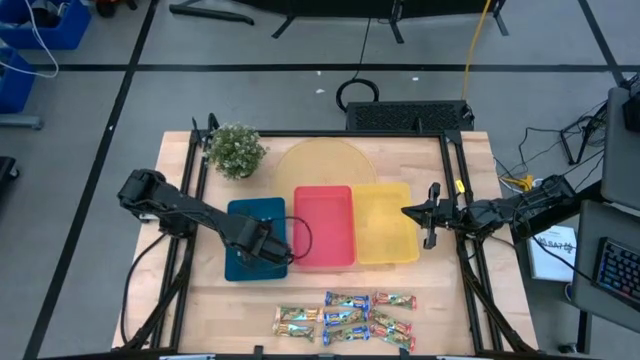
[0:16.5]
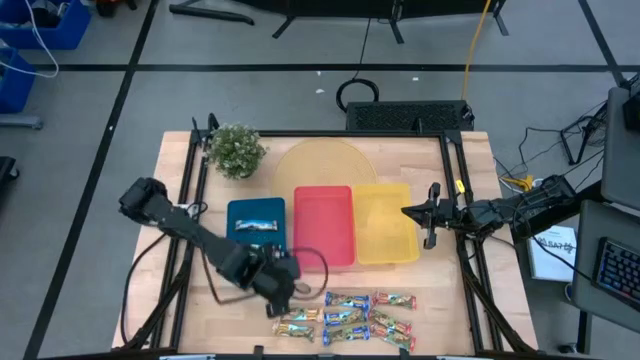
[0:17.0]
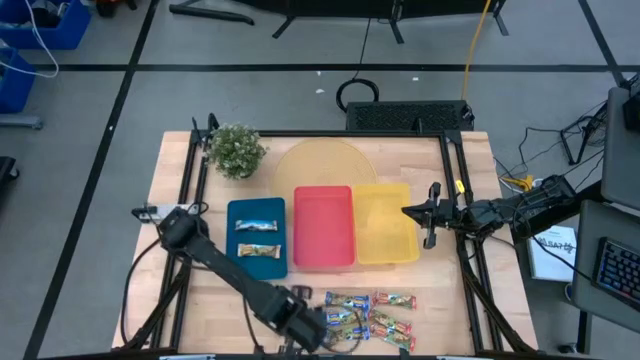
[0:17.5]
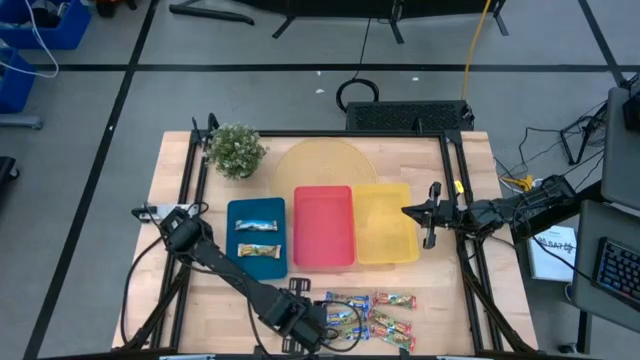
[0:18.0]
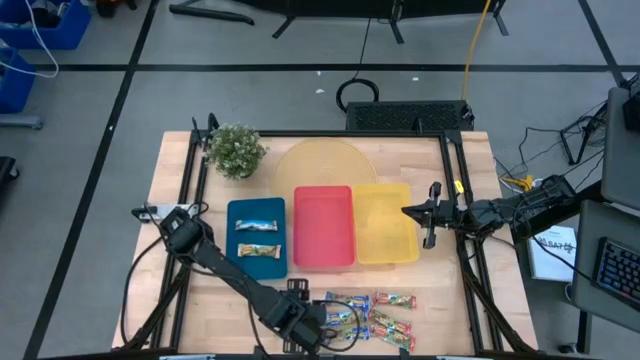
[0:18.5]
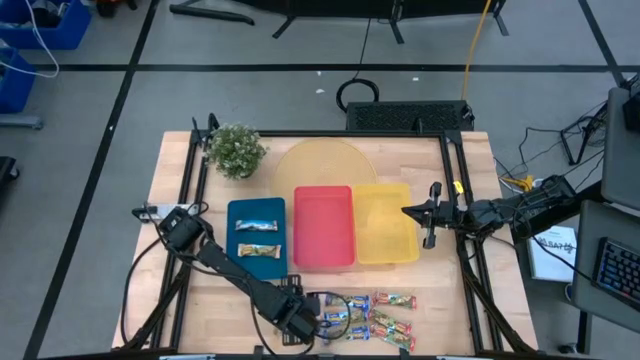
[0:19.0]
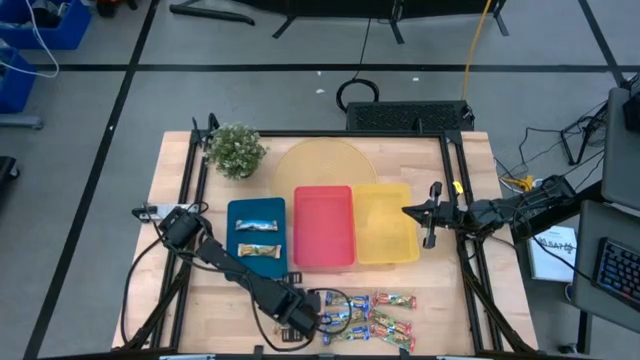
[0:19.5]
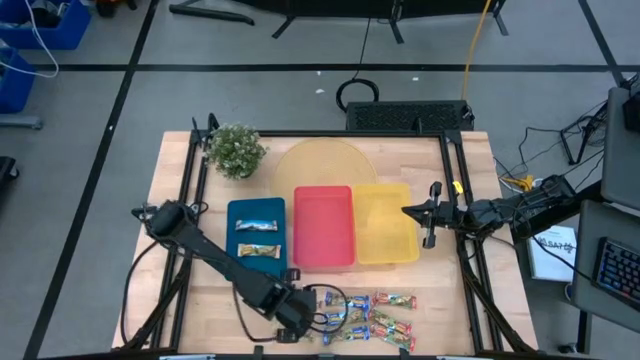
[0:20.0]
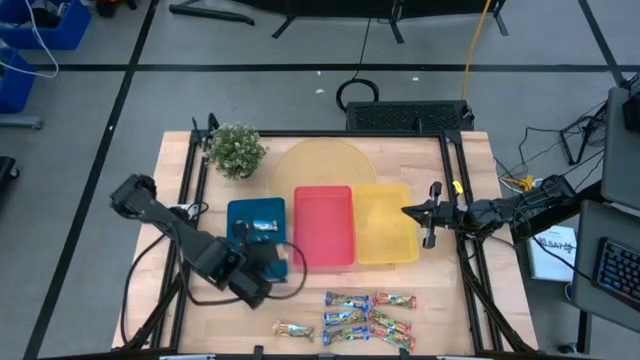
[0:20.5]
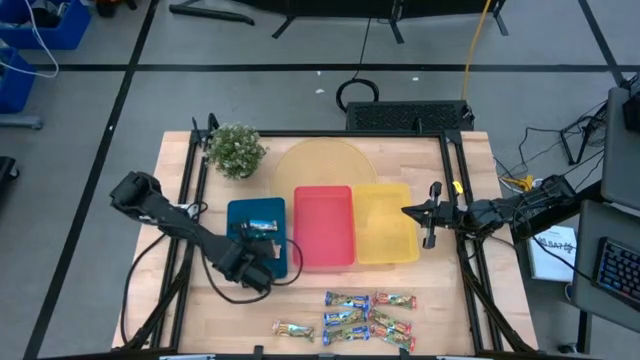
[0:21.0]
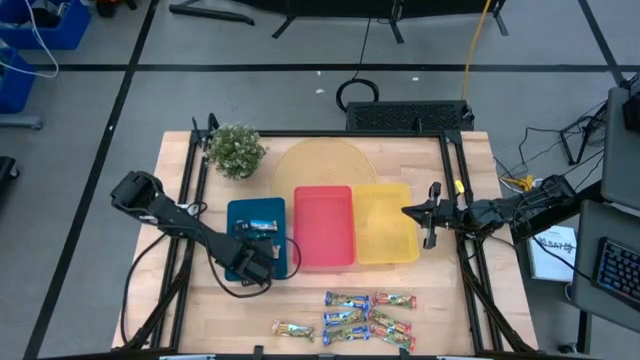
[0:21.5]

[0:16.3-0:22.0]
Task: Pick and place Granola Bars by type
Put the yellow granola bar into the blue bin

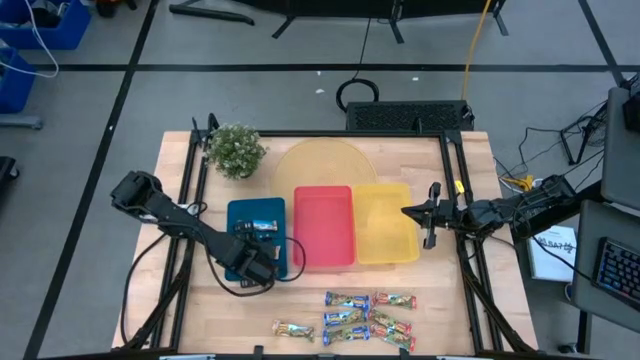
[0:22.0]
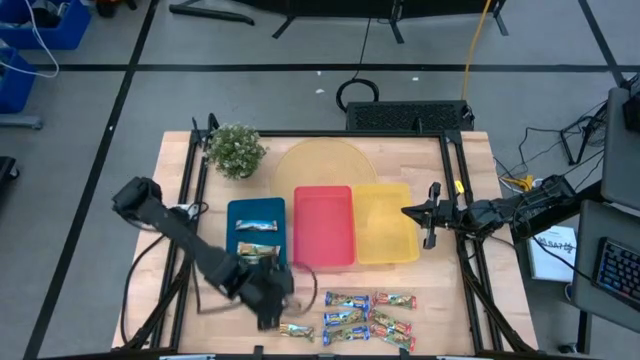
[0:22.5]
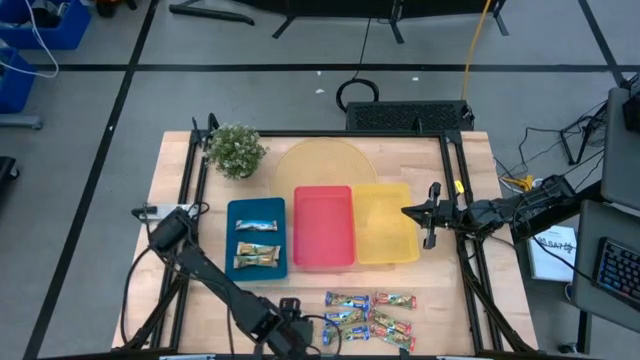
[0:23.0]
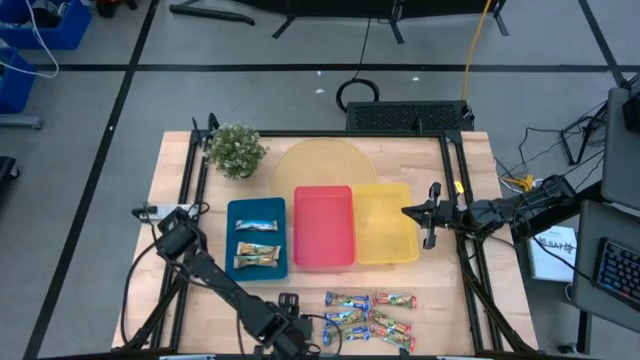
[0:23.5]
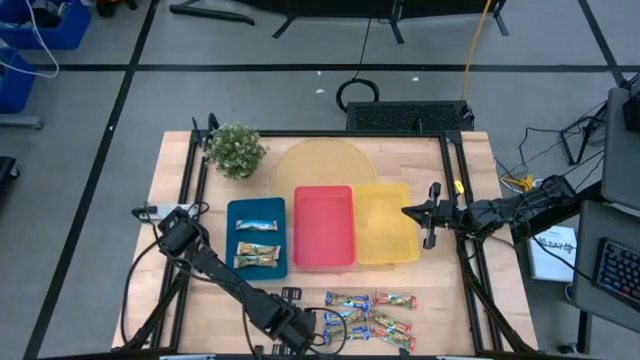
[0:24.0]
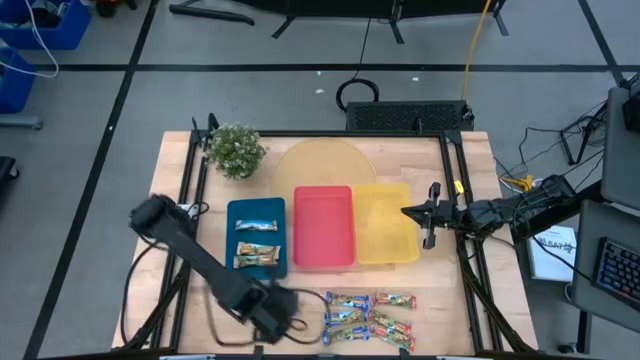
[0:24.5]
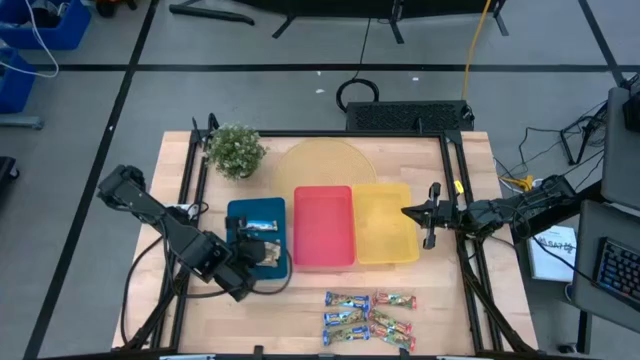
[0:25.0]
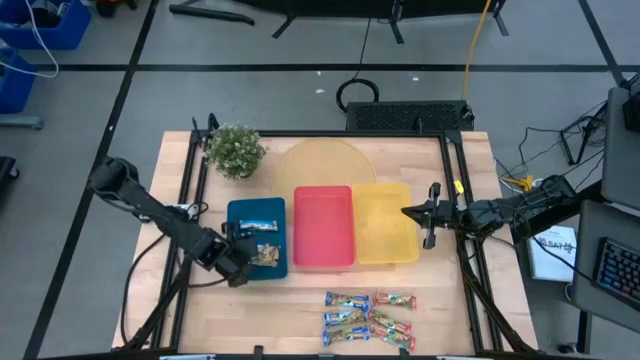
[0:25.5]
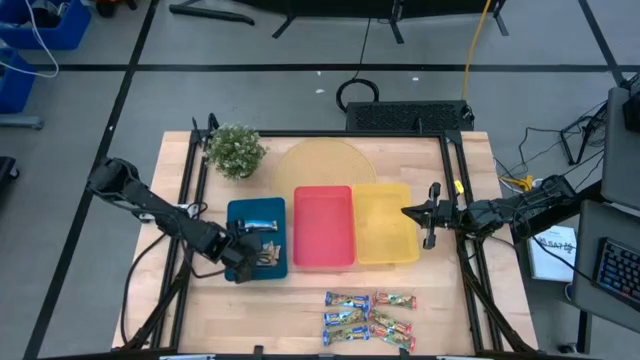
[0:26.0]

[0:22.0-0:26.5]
Put the yellow granola bar into the blue bin

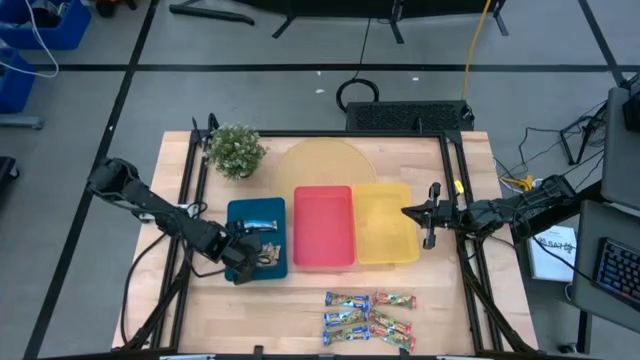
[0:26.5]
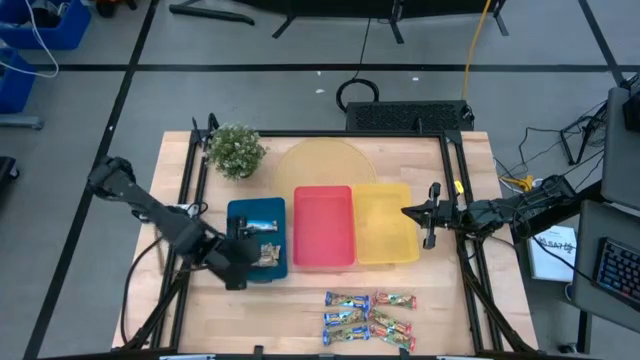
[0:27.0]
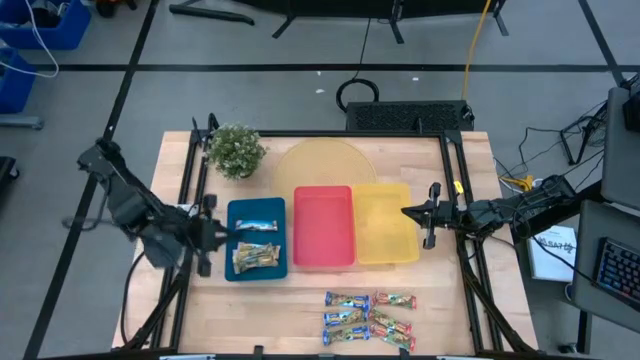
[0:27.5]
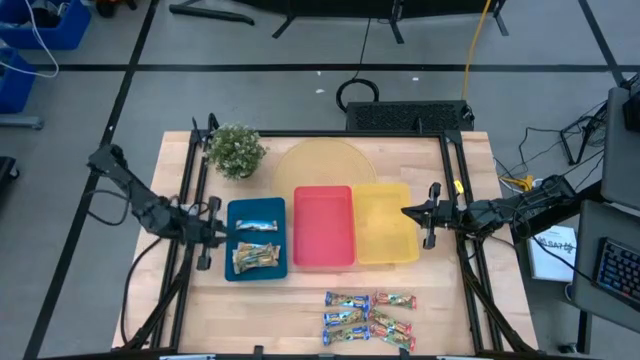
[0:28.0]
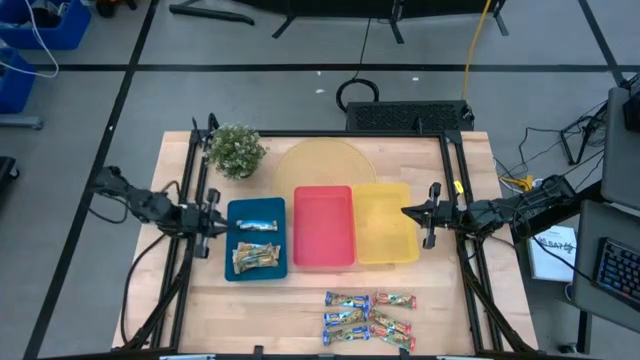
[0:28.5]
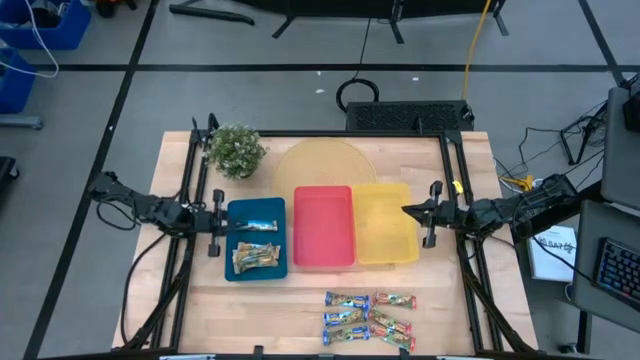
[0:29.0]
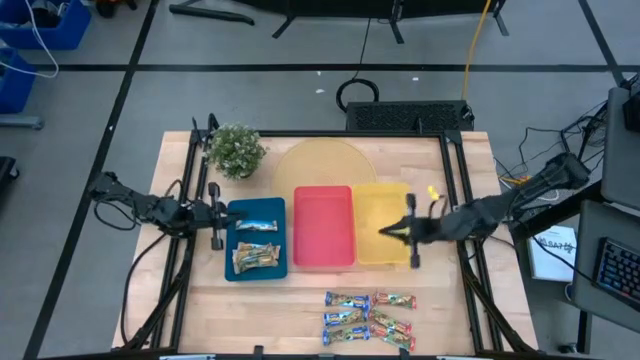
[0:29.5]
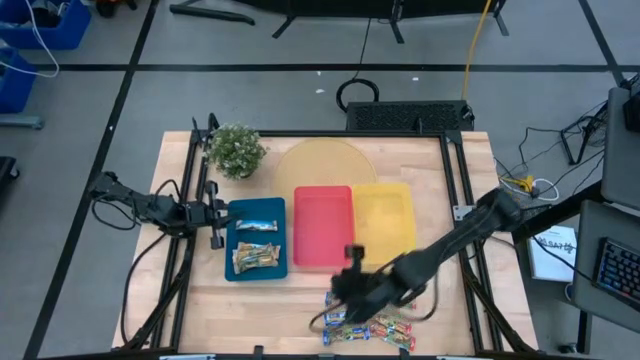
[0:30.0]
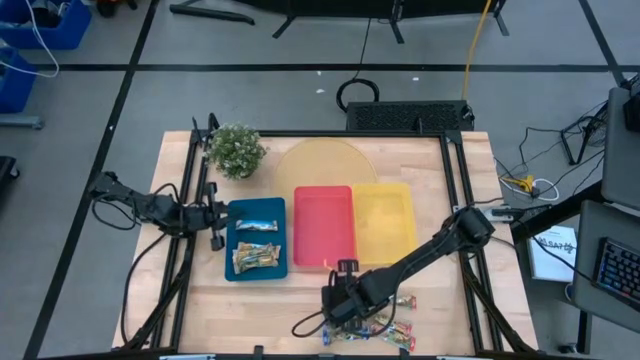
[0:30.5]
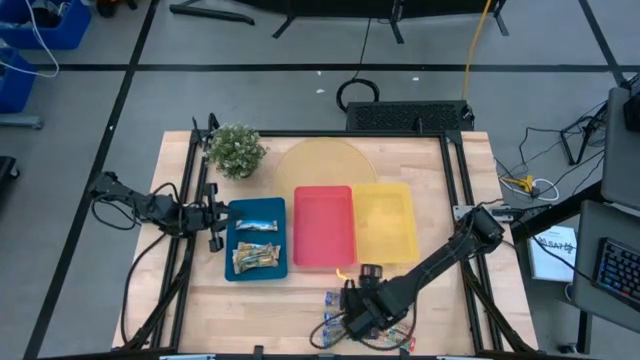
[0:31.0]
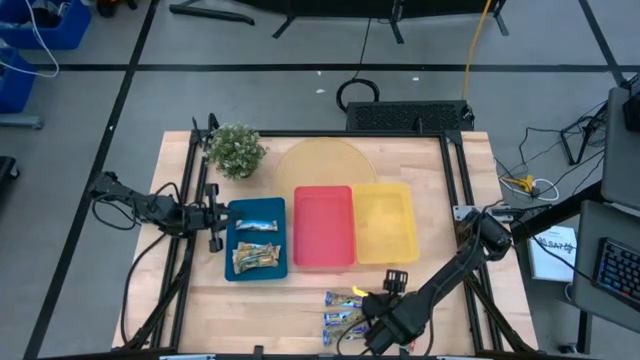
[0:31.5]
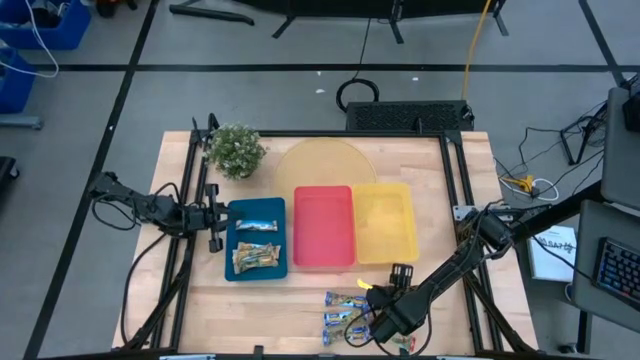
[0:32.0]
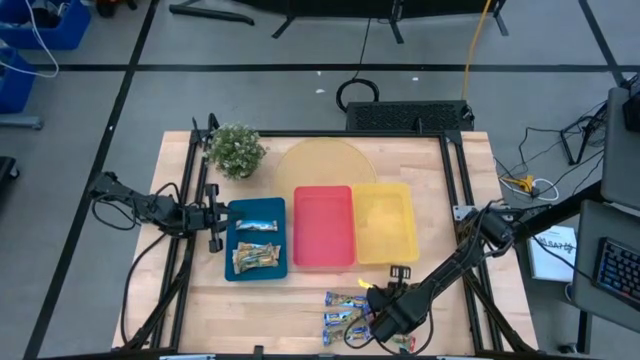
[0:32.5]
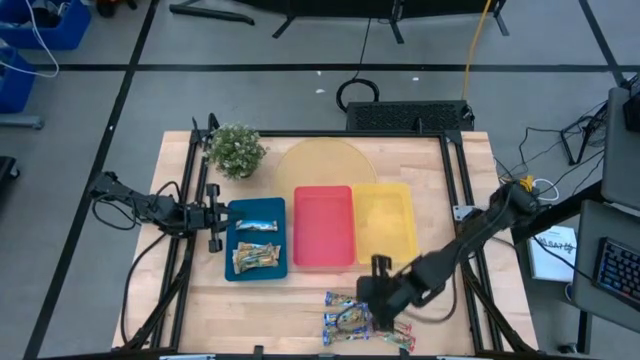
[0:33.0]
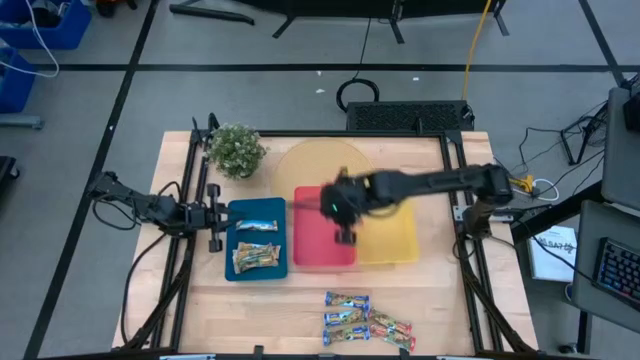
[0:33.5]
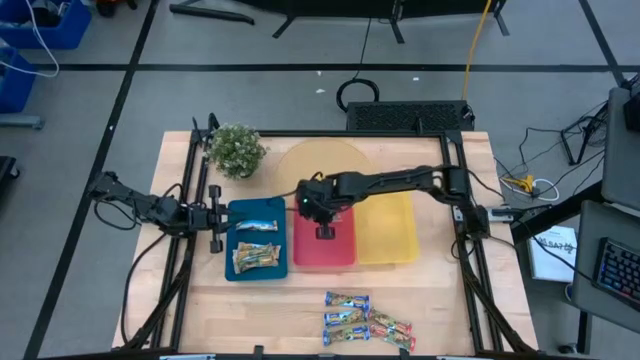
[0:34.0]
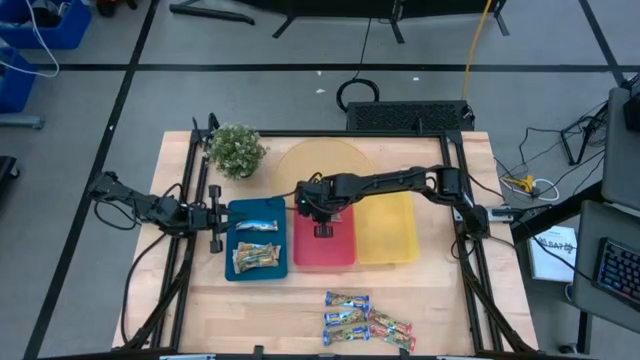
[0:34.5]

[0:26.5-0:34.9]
Put the red granola bar into the red bin

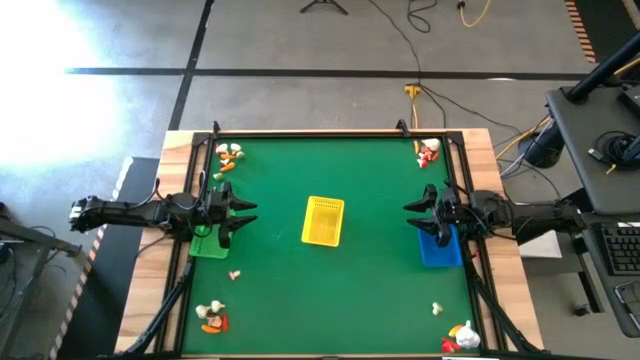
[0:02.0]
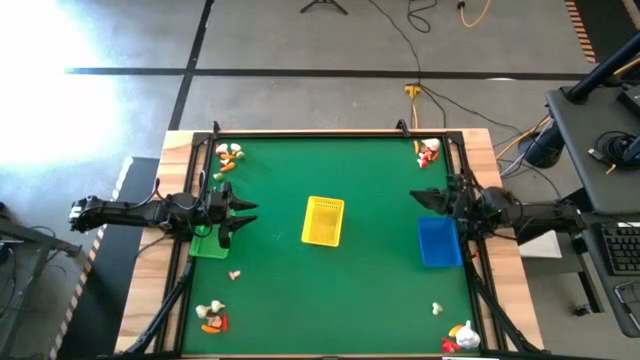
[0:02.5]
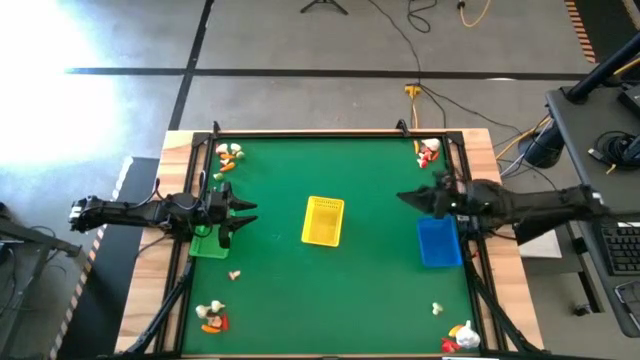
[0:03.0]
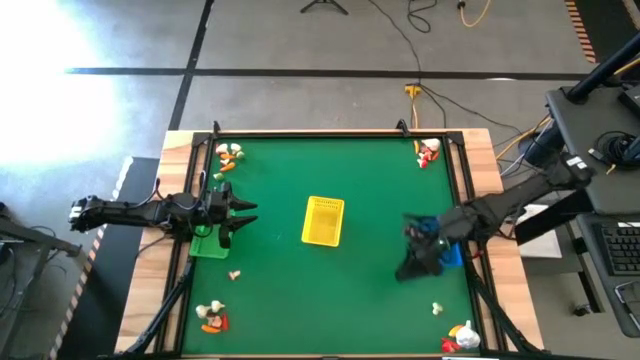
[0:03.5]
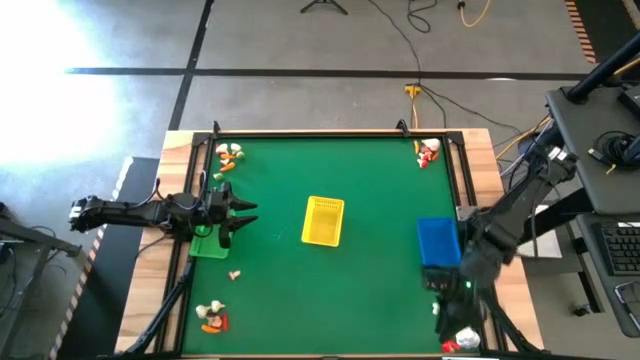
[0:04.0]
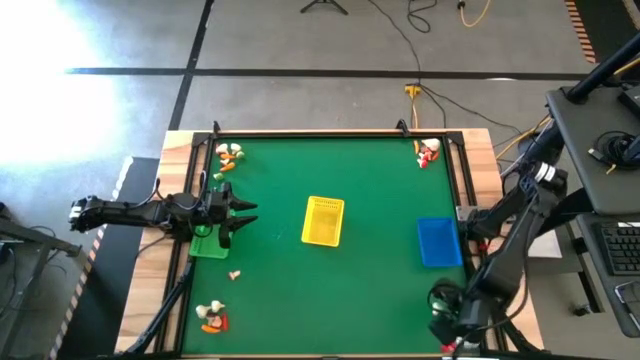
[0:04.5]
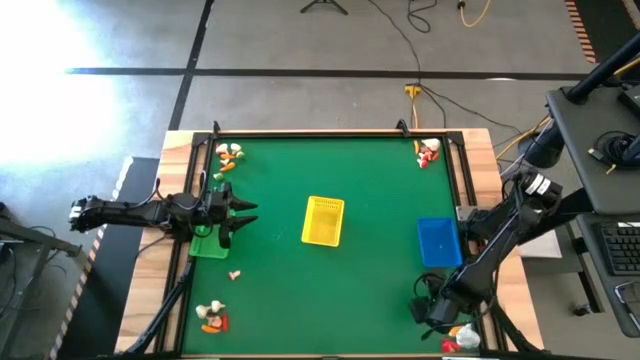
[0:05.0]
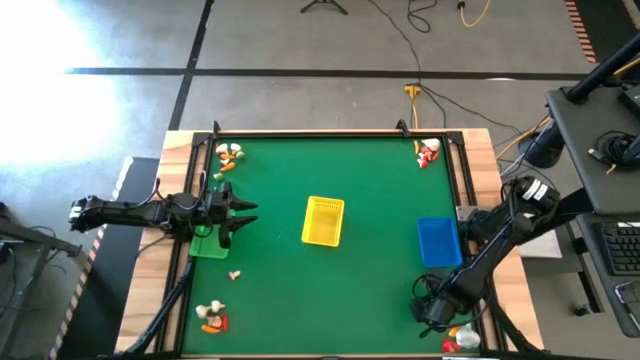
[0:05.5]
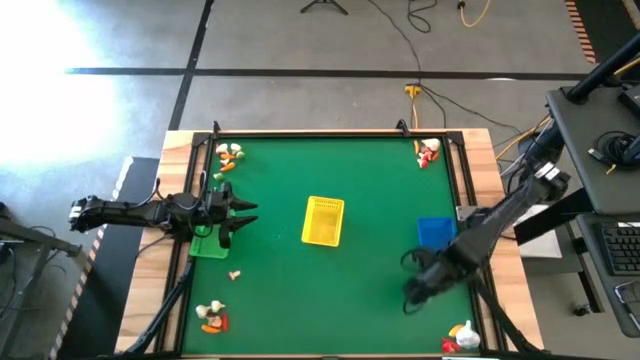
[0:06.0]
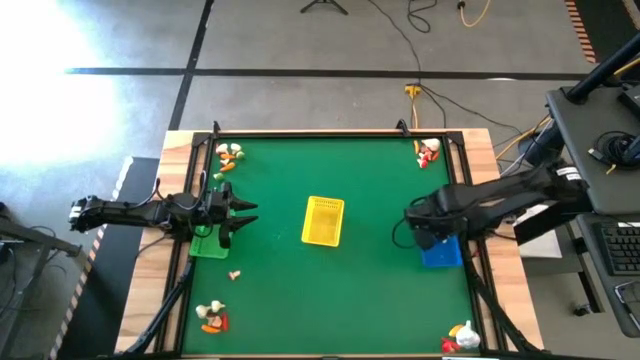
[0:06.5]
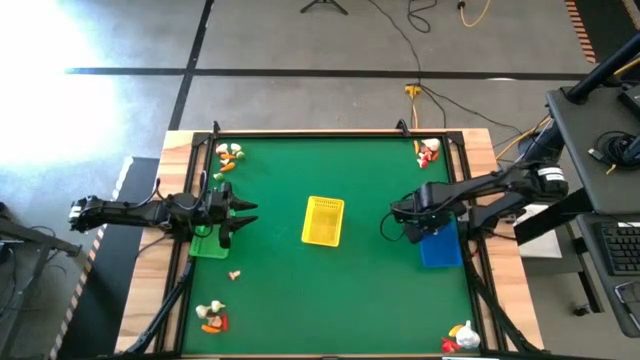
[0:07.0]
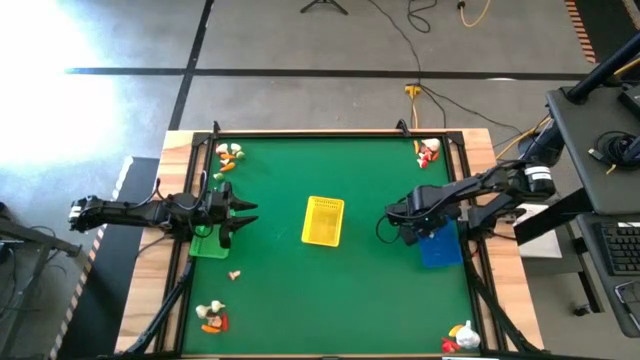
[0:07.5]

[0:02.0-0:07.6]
Task: Sort produce into baskets
Put the green mushroom into the blue bin
